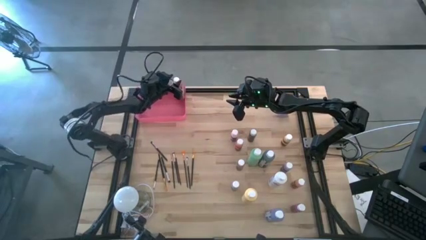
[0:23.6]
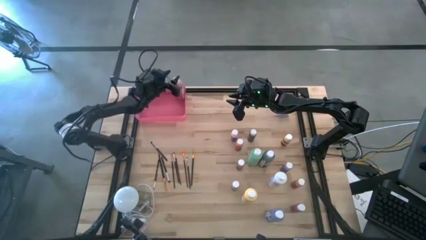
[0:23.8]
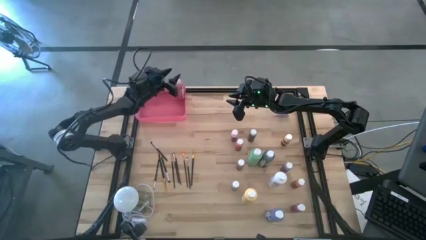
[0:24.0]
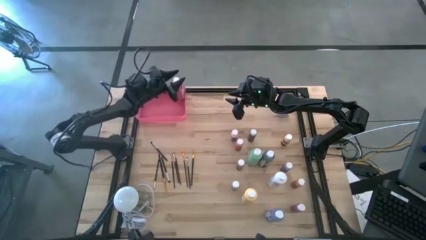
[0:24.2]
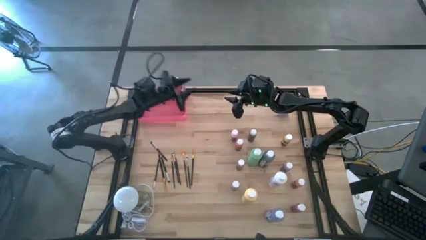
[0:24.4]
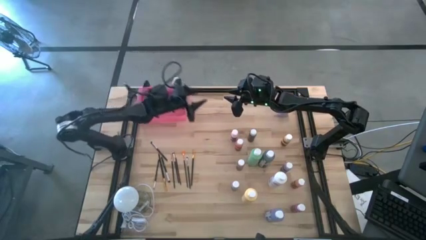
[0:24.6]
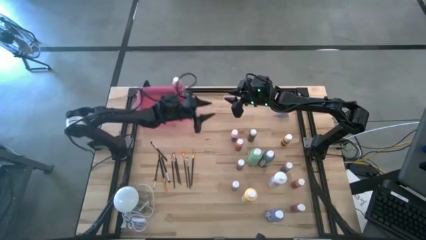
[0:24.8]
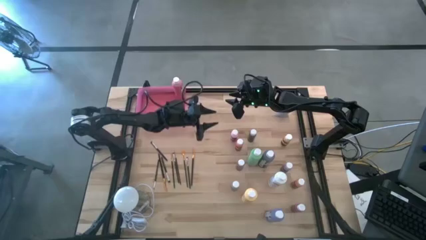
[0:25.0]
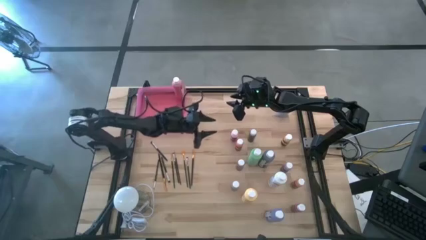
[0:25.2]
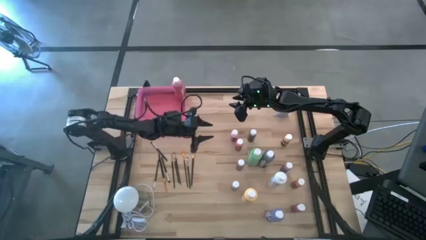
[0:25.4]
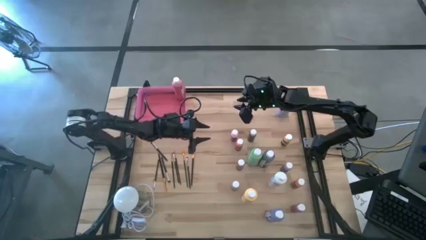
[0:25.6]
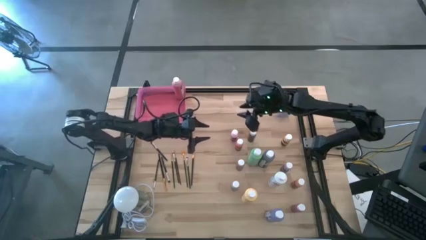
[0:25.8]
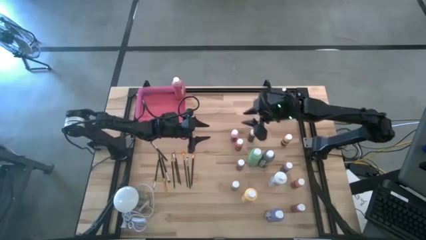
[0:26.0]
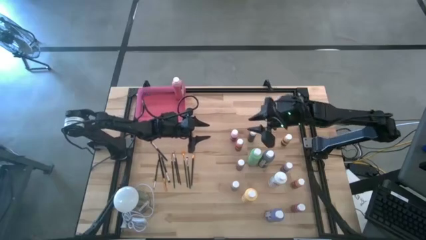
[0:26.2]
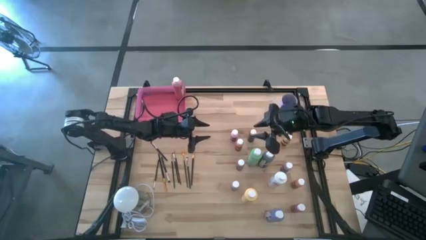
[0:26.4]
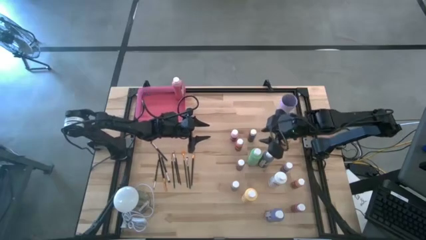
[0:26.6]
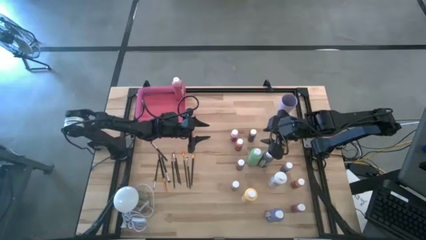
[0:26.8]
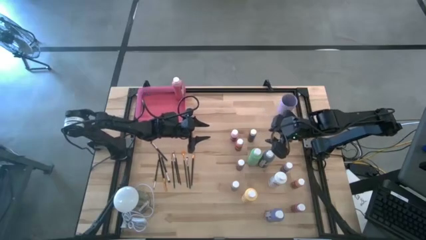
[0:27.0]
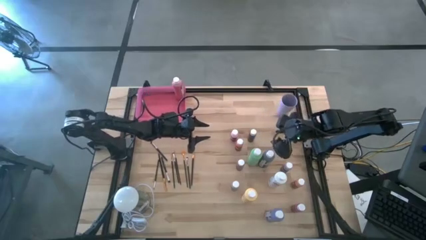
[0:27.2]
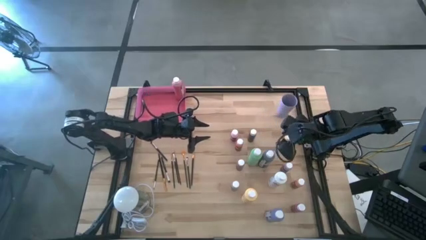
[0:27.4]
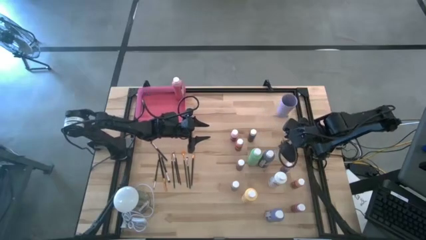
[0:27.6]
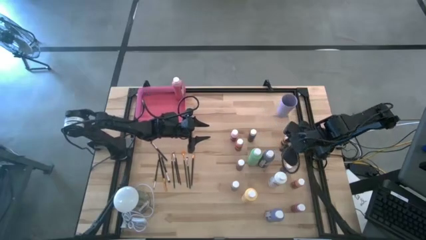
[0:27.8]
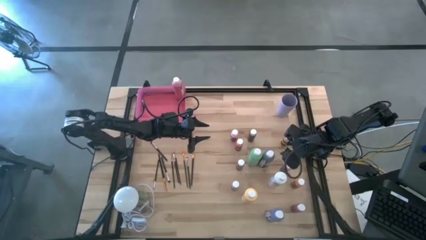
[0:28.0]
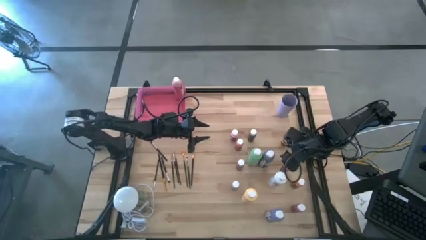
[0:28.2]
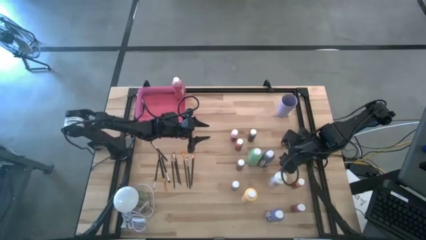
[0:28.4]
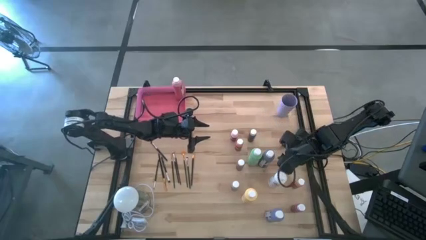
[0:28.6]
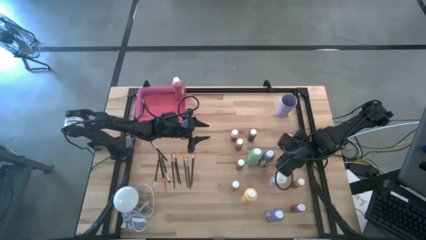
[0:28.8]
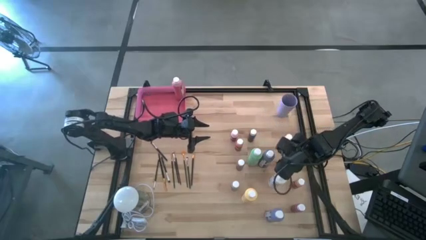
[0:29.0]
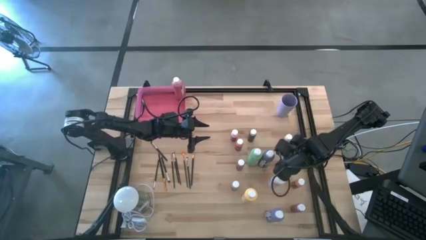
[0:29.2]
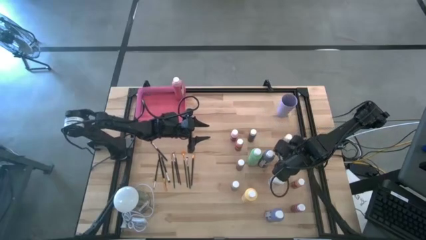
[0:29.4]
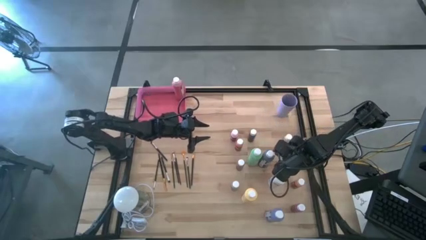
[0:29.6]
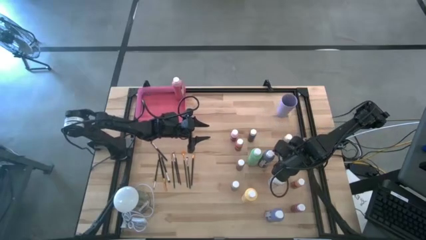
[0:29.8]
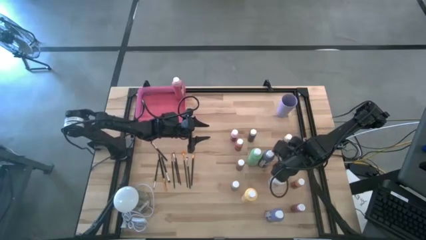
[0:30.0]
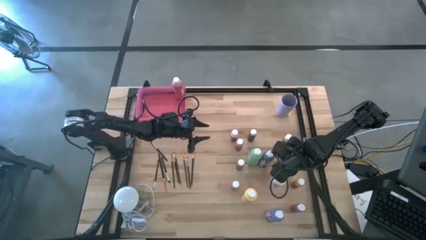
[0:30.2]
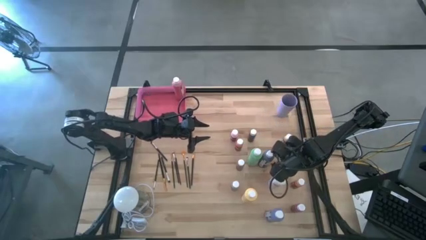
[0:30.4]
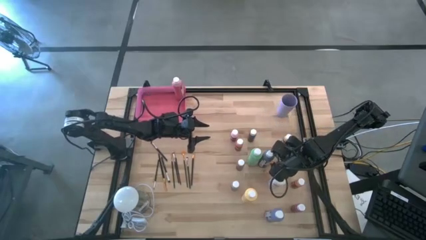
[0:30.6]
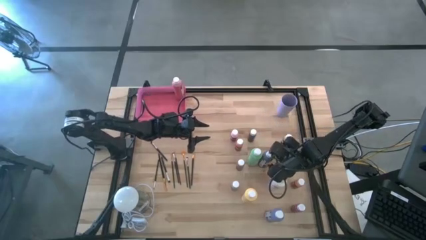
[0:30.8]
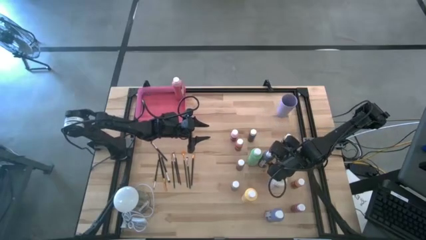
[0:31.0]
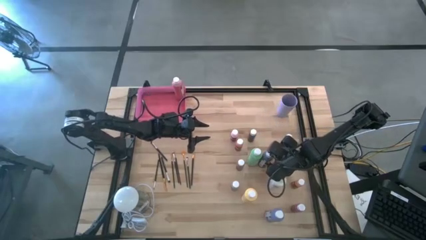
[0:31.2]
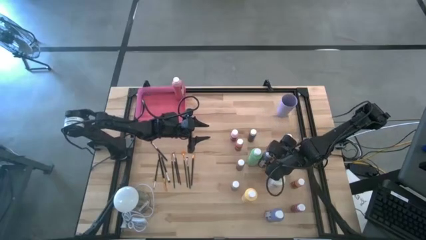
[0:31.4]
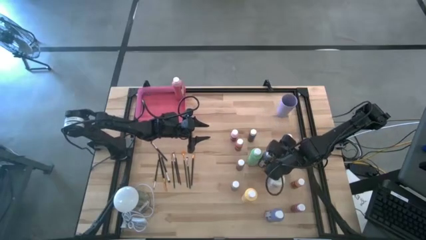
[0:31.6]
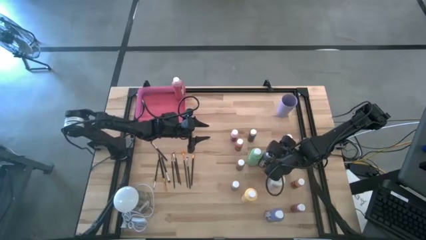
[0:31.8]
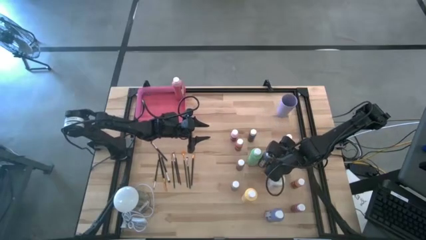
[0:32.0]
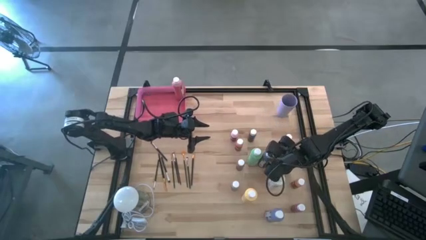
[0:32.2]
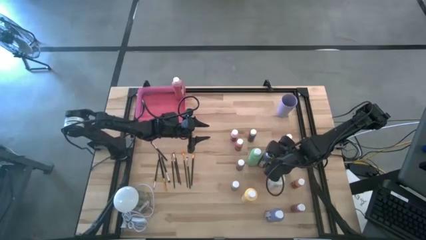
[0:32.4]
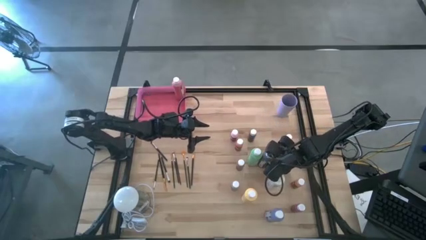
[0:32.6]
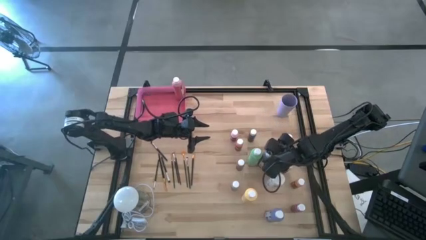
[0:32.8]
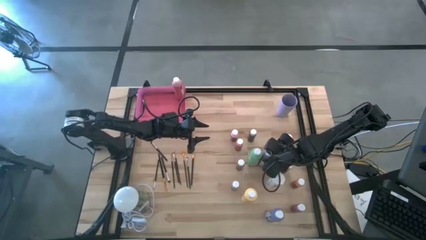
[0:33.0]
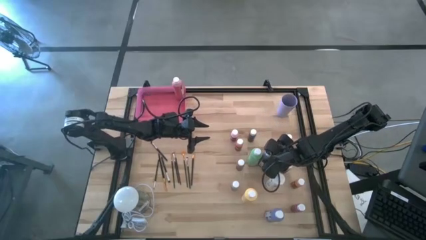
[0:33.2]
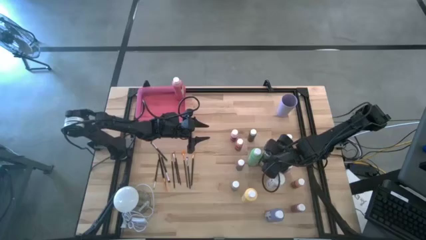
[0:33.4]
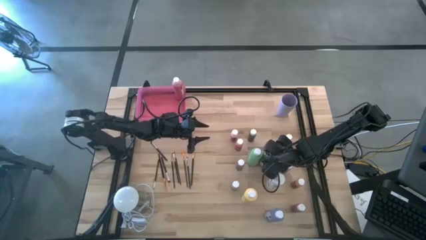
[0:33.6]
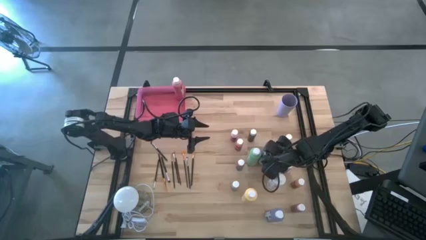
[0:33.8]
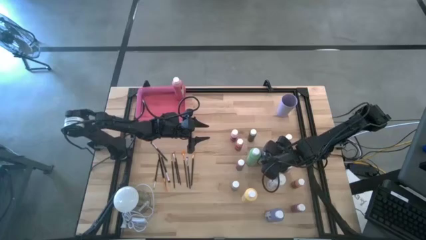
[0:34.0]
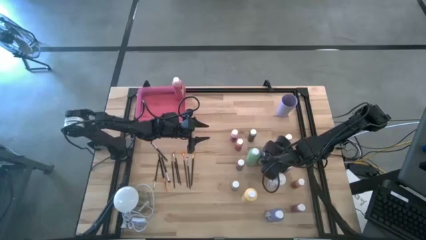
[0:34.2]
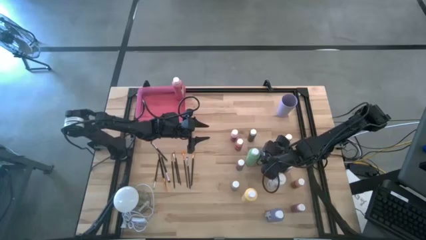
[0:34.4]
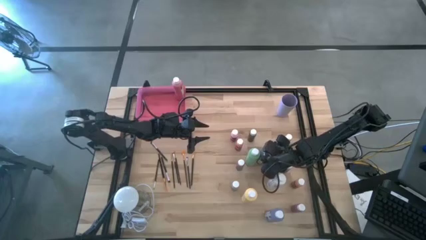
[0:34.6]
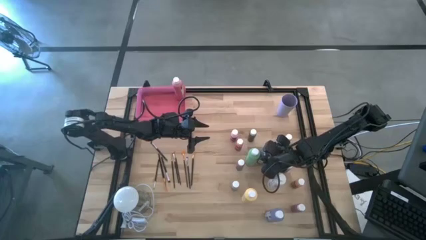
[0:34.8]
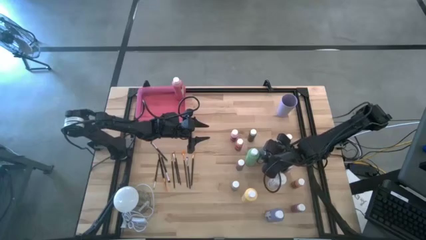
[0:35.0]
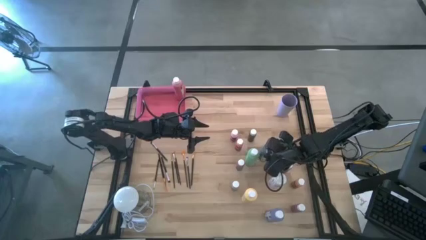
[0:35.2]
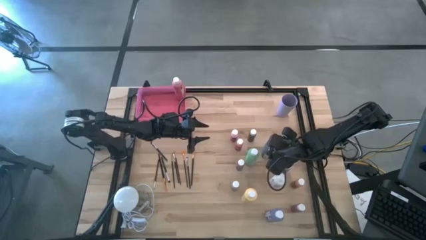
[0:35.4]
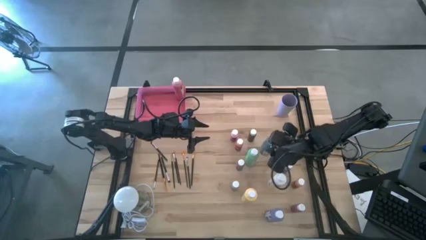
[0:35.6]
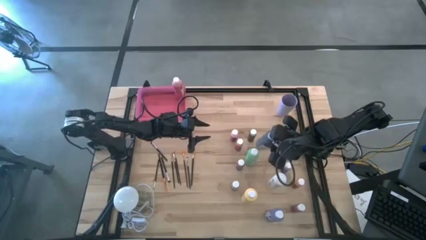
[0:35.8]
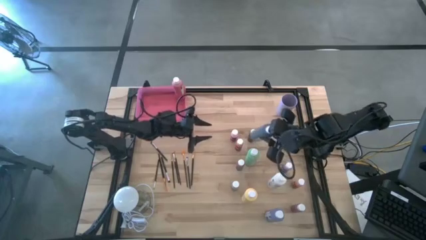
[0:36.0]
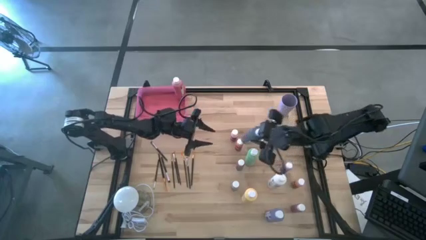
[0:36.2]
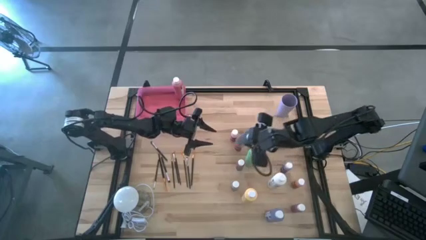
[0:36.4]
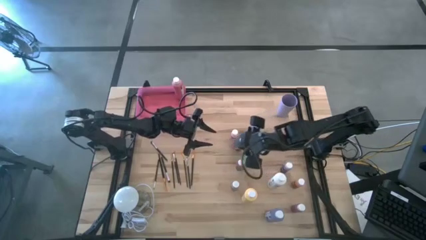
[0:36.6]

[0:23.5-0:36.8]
Task: Pick & Place Paint Supplies
Put the large black paint bottle into the pink bin
